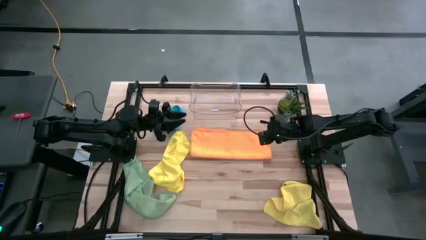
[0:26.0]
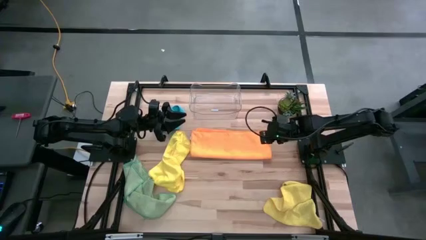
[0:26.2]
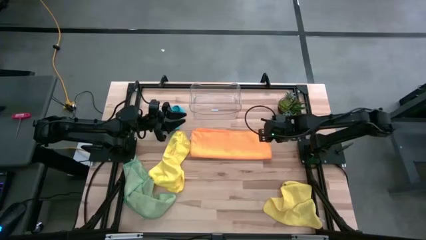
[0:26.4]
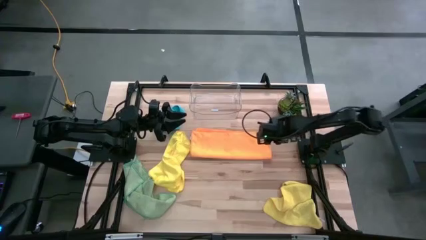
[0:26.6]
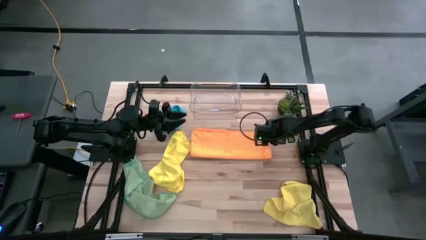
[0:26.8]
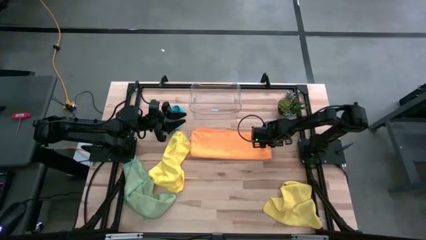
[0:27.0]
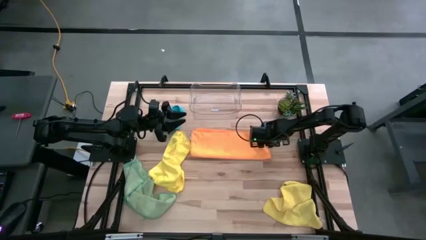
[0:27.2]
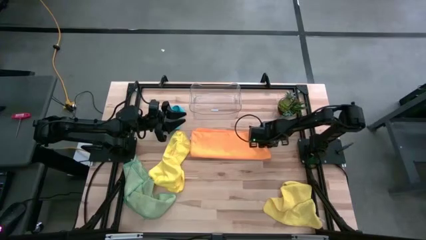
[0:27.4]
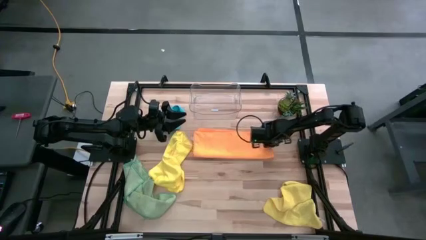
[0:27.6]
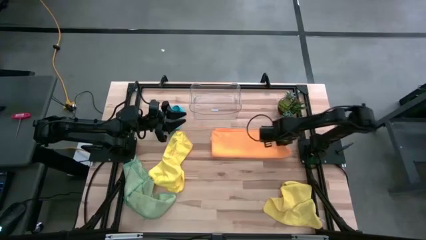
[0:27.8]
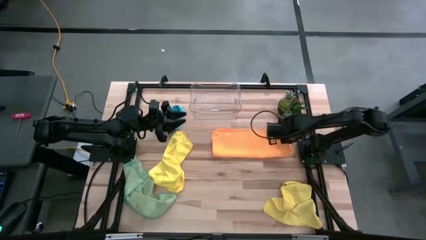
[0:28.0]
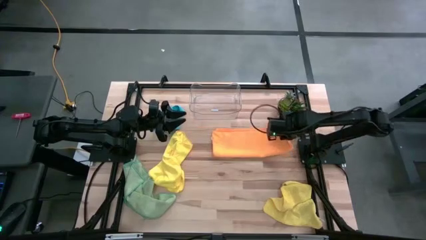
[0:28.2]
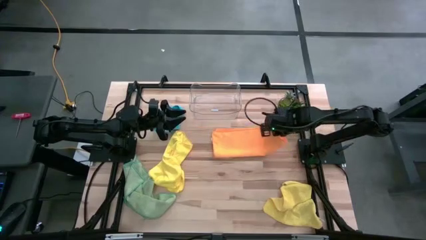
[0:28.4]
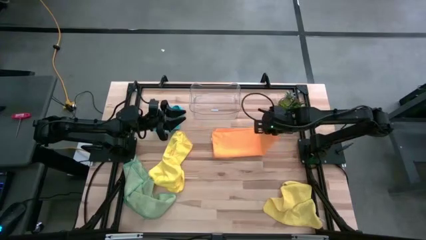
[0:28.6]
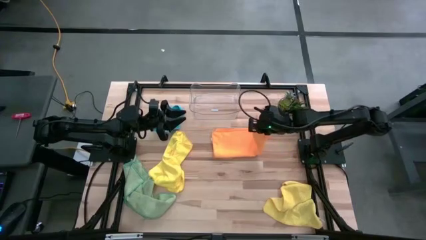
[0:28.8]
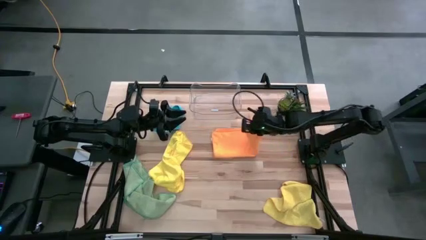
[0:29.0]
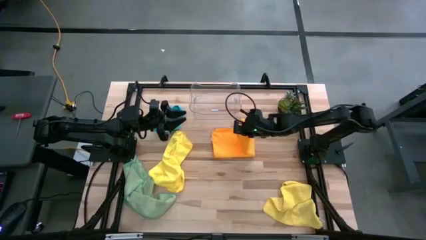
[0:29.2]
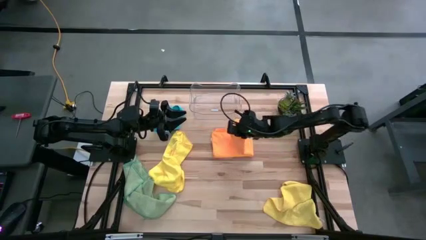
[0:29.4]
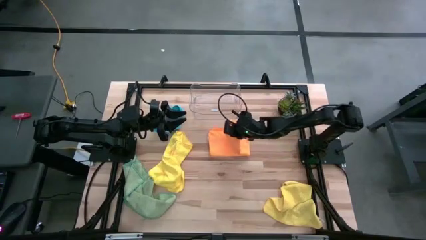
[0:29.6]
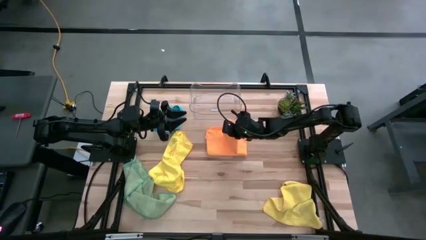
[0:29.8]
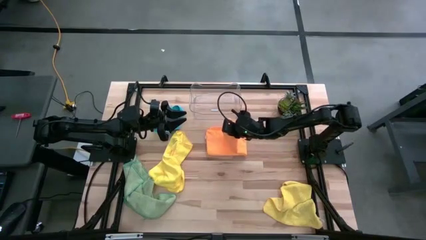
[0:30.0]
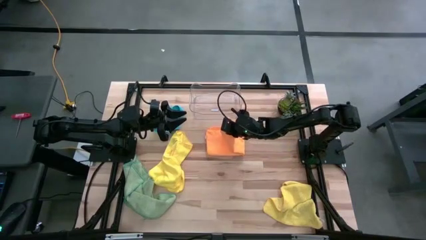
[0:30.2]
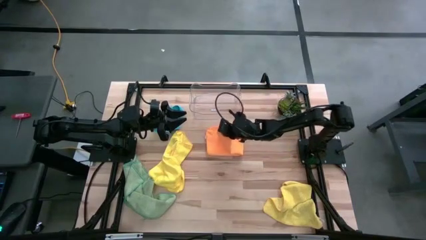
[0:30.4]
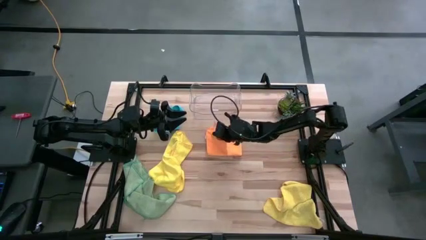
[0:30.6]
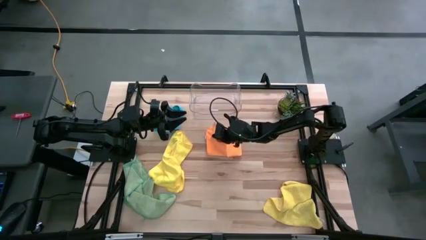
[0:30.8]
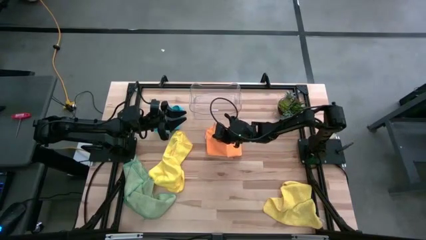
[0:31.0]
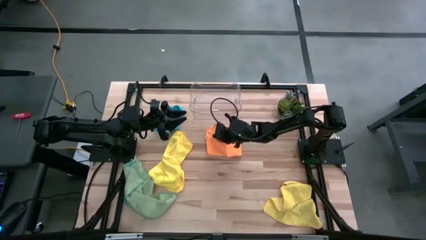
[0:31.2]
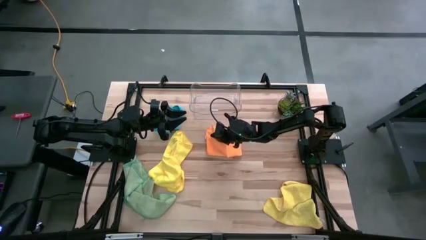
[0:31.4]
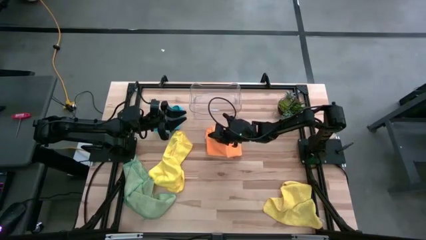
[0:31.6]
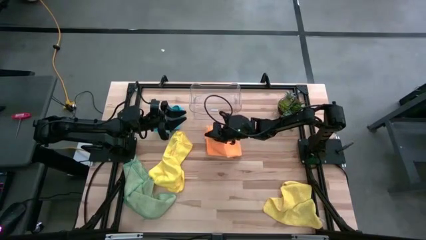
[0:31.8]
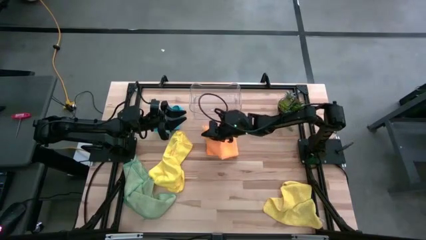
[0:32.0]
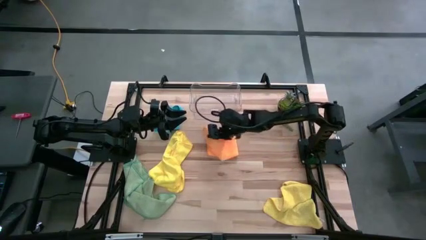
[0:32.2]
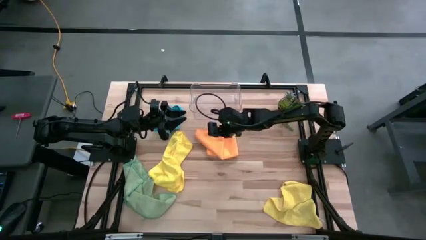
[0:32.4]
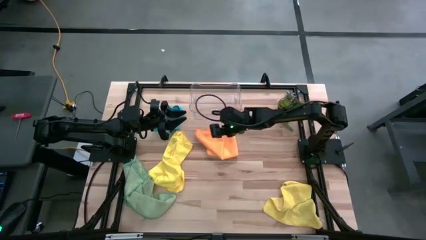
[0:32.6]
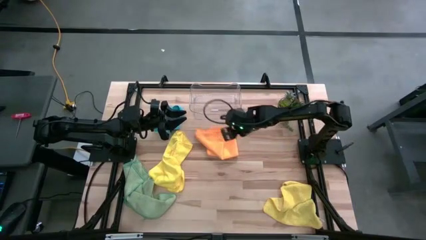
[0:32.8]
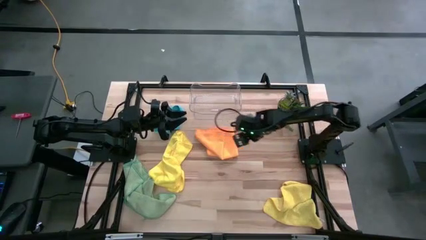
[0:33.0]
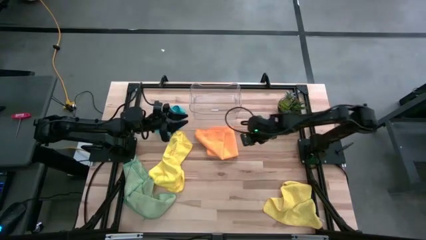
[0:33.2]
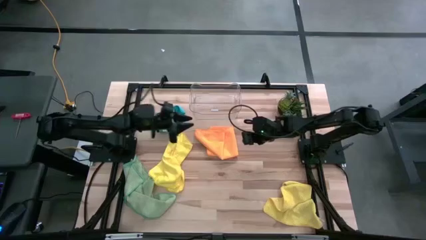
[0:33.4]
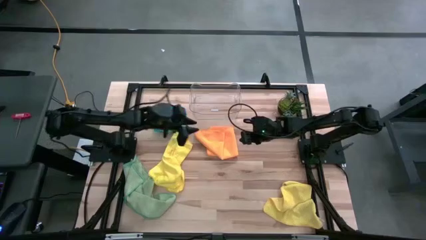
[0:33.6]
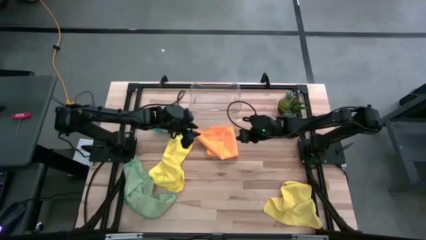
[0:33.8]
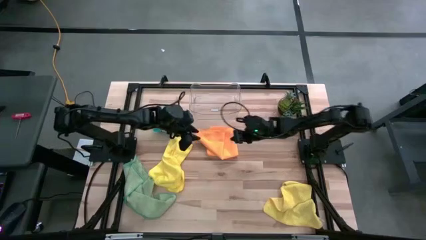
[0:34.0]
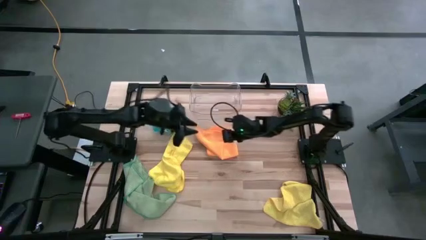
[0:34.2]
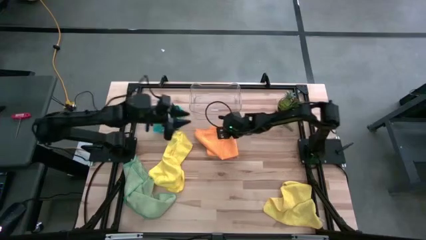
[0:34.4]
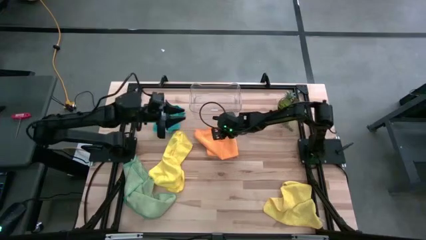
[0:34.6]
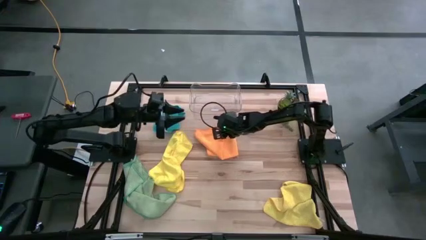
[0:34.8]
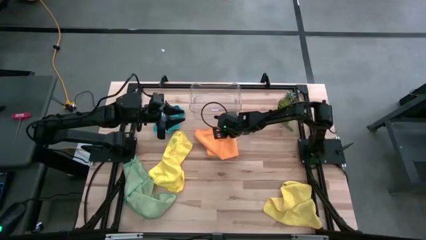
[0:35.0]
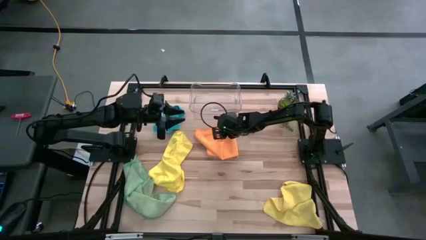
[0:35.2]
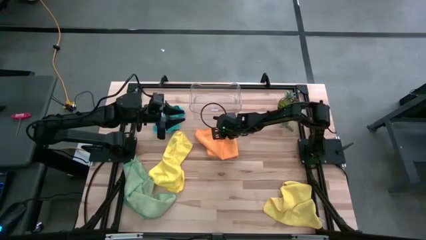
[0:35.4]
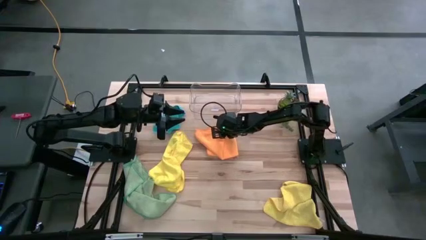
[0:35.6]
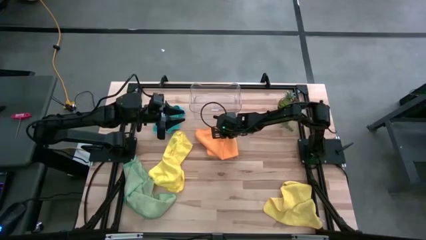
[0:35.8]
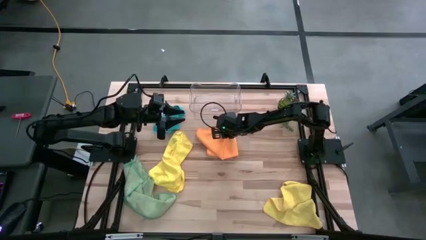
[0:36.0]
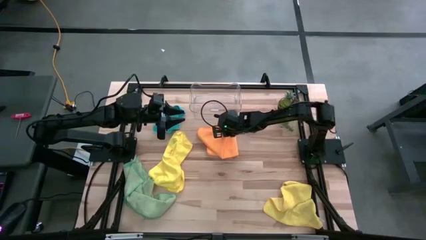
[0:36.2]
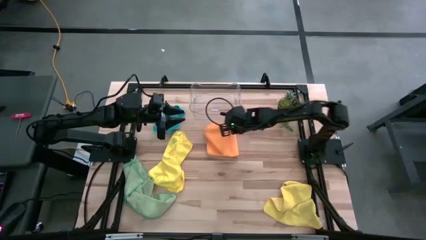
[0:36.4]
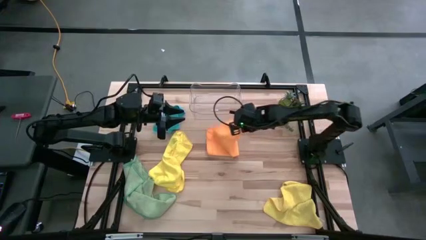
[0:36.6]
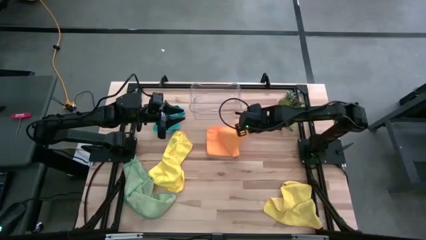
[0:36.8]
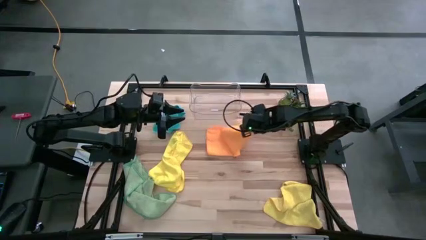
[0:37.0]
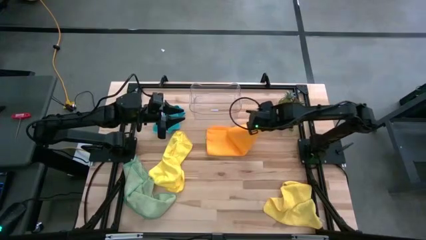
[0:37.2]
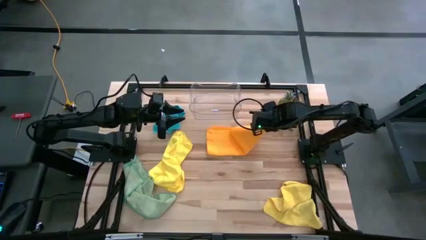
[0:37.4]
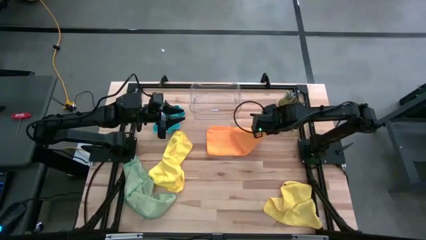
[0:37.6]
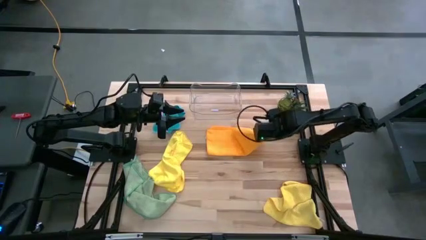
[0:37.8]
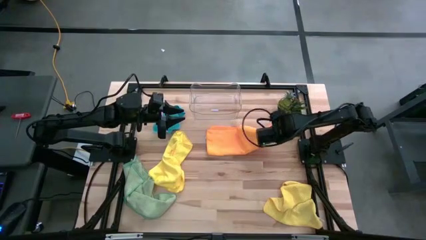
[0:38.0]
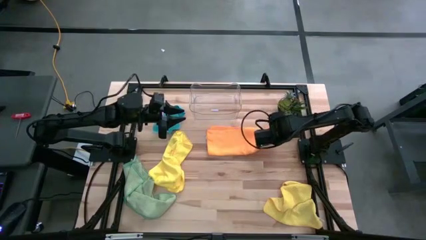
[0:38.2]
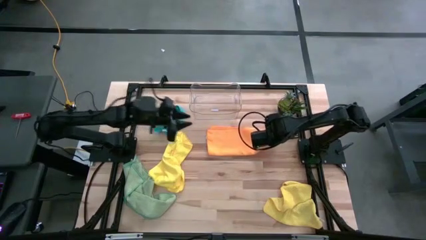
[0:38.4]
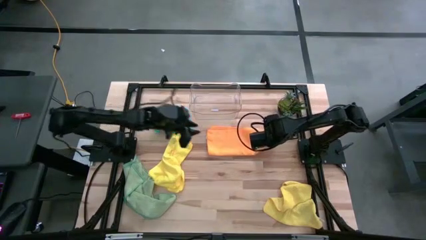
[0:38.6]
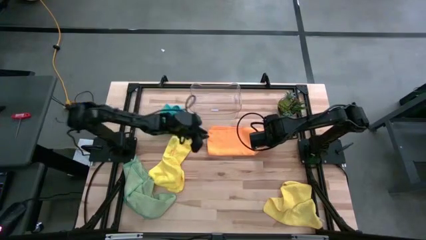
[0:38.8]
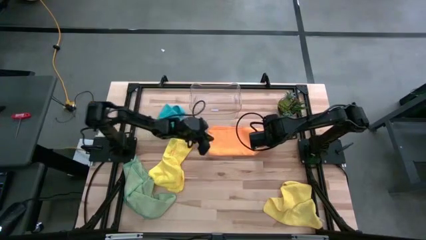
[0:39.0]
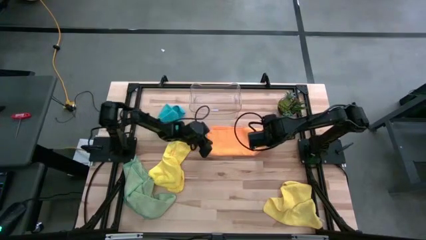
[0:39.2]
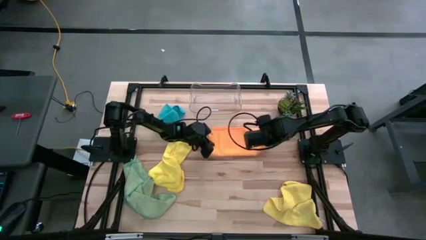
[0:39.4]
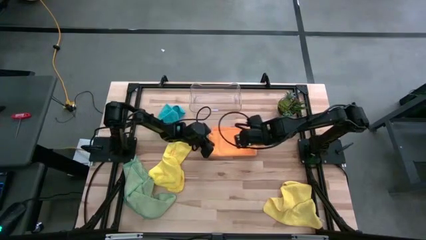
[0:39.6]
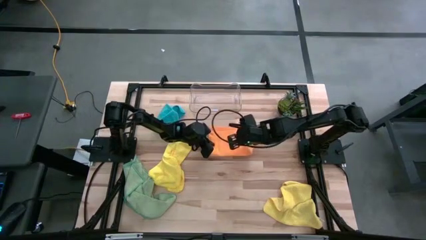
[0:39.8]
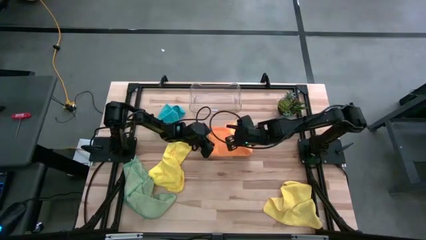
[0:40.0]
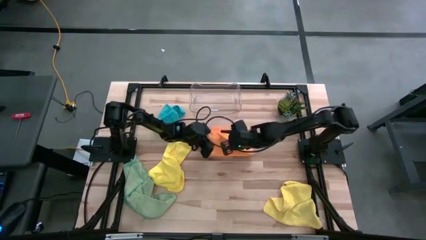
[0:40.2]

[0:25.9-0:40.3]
Task: Fold microfiber towels
Fold the orange microfiber towel

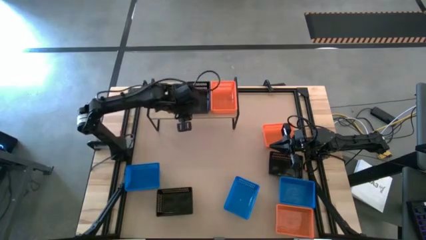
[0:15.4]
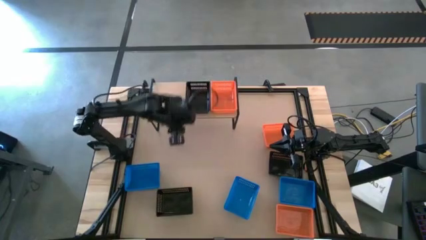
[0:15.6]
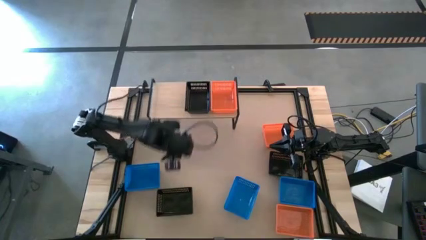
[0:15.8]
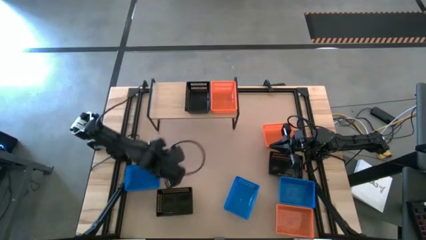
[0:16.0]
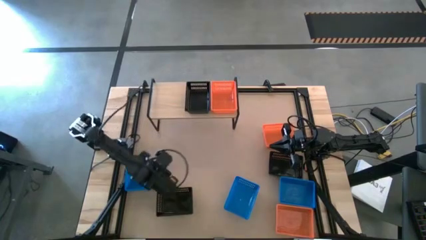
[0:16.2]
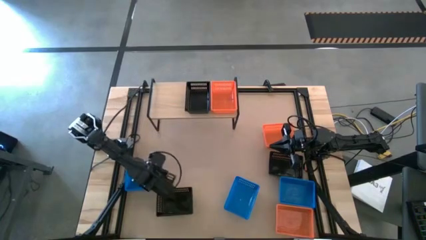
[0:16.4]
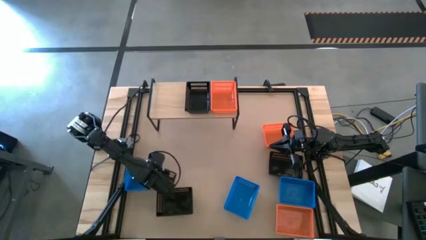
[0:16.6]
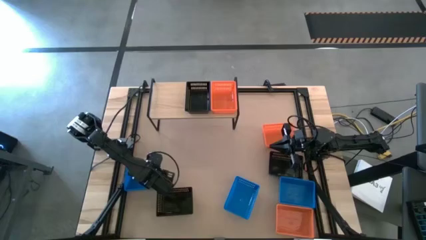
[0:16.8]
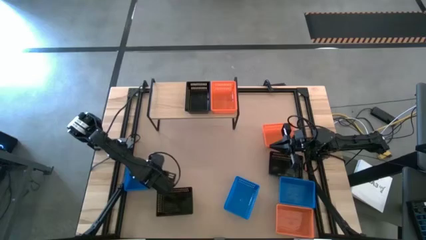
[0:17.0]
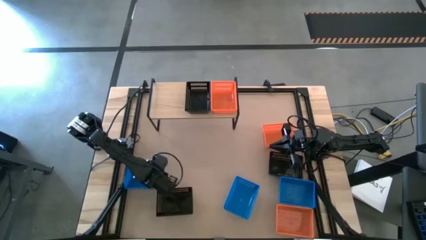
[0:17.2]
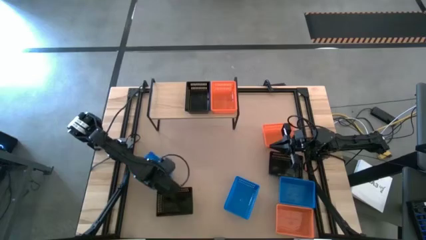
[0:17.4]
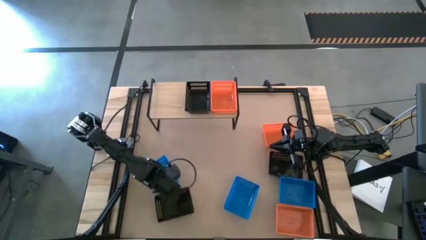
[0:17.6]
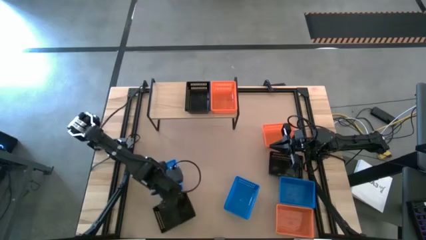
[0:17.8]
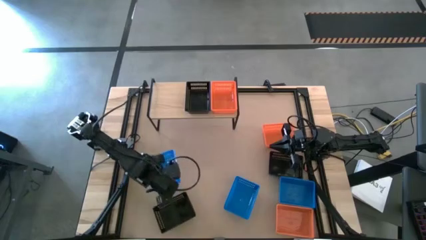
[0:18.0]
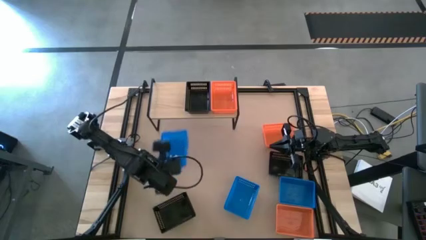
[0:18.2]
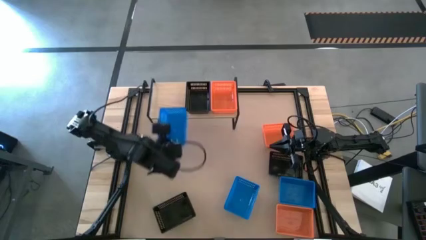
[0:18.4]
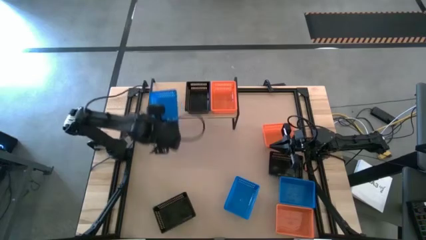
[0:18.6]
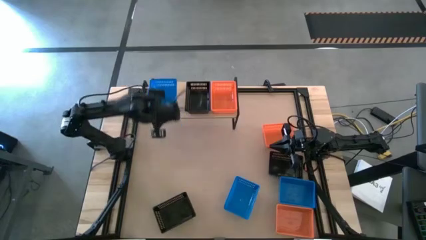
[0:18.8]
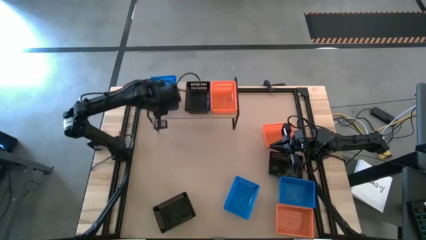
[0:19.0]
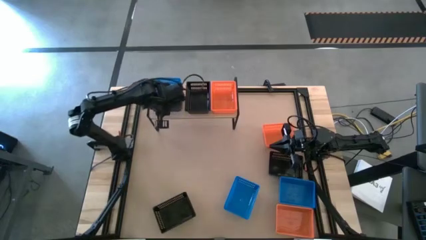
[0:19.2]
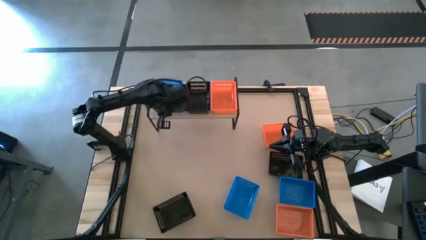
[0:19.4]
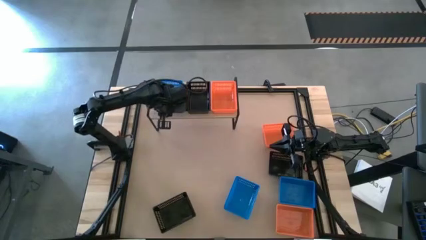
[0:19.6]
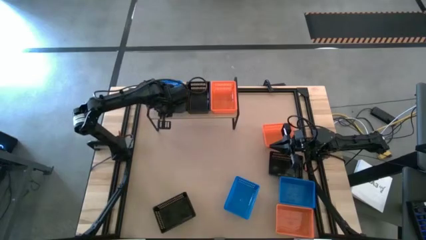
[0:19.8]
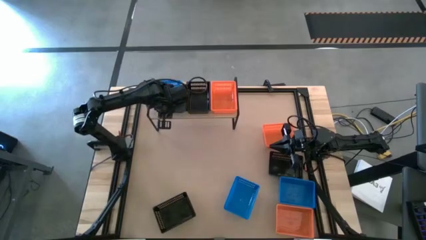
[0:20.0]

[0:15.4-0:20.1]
Task: Stack baskets on shelf by color
Put the left blue basket on the shelf
